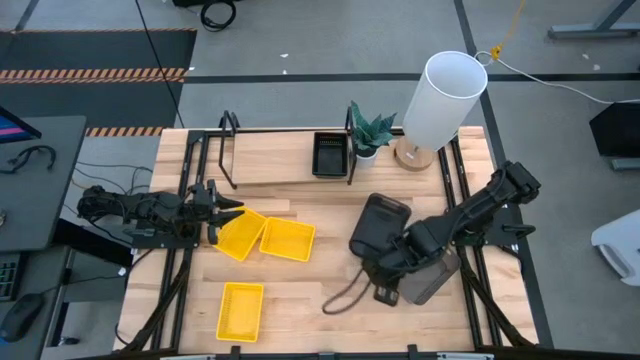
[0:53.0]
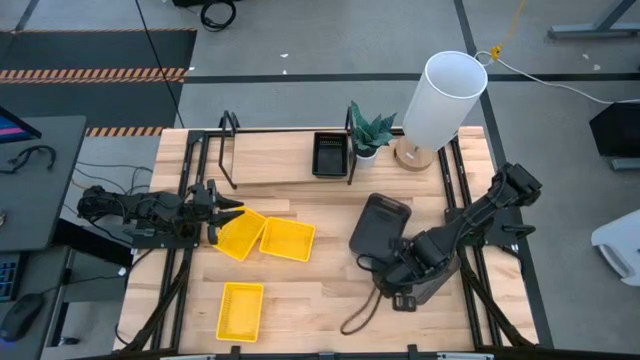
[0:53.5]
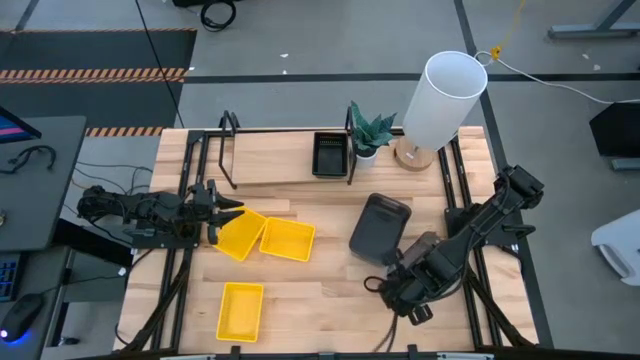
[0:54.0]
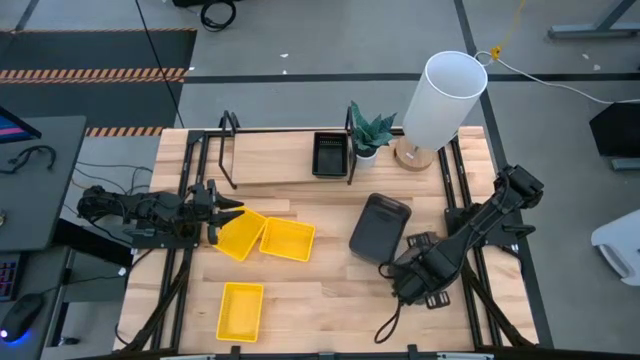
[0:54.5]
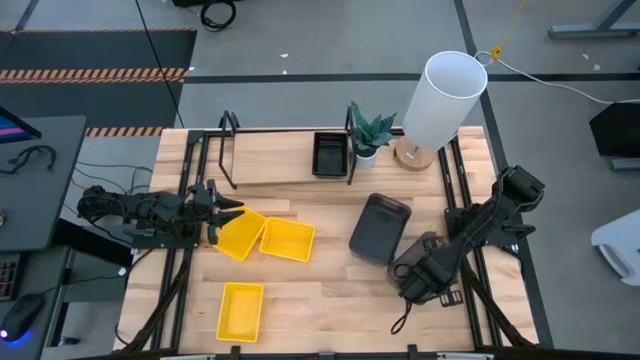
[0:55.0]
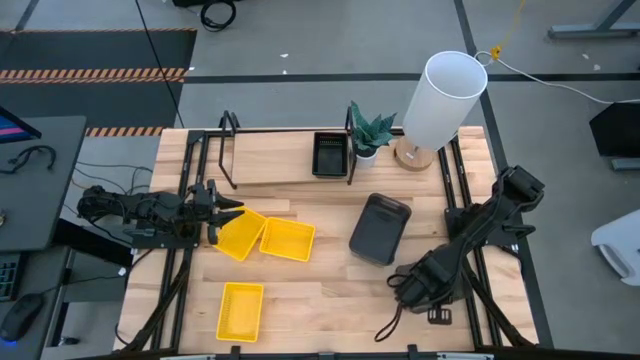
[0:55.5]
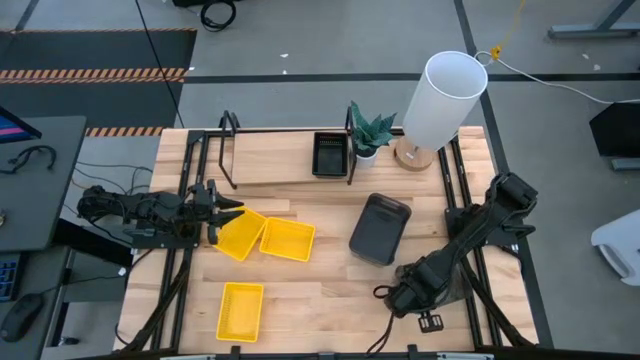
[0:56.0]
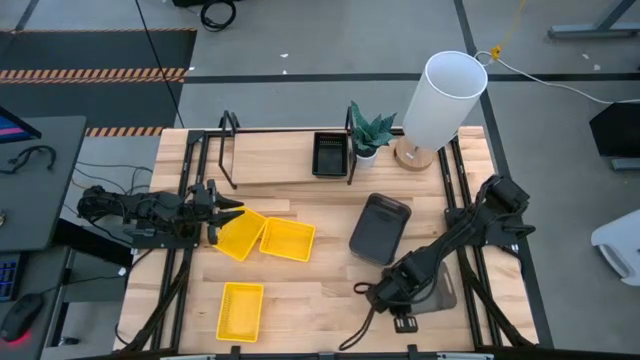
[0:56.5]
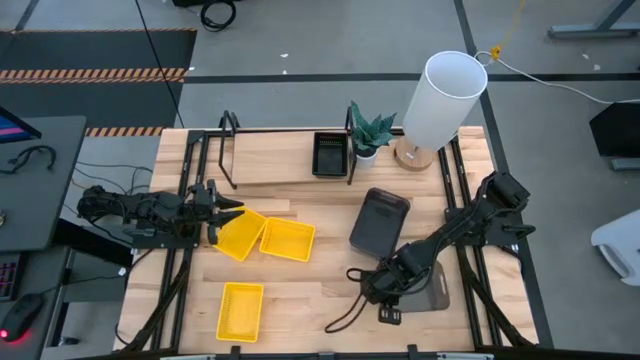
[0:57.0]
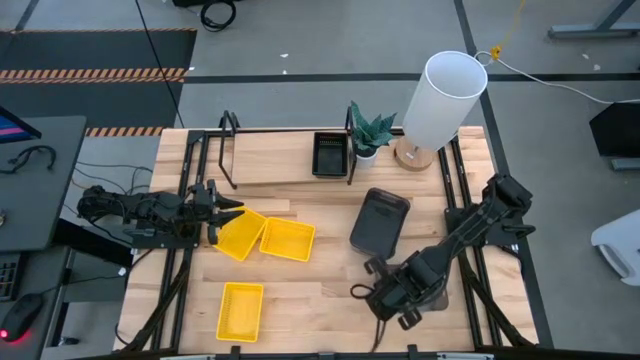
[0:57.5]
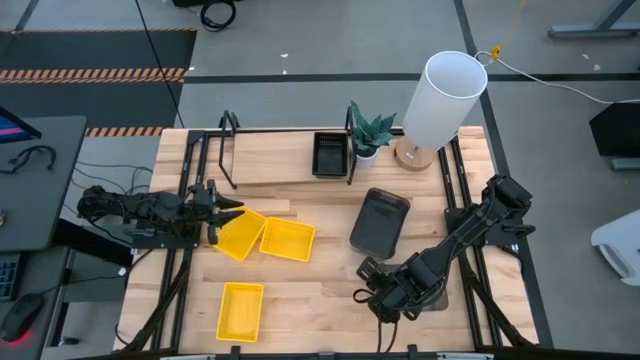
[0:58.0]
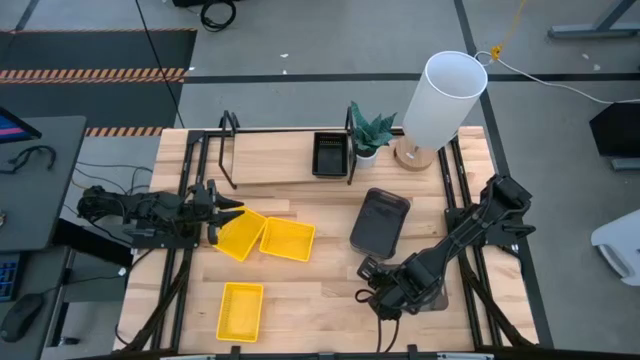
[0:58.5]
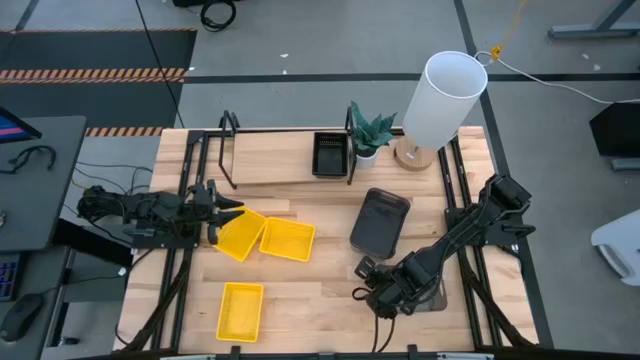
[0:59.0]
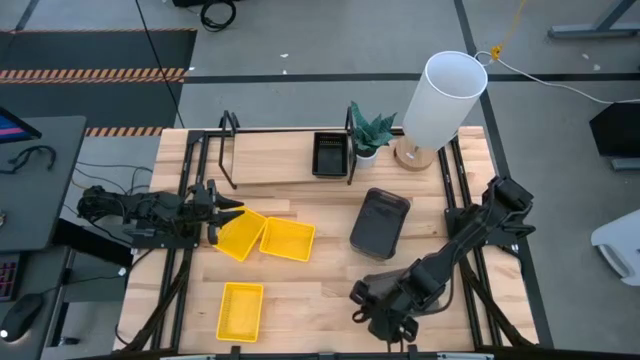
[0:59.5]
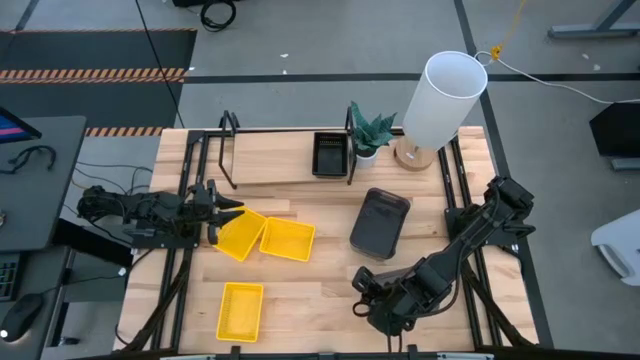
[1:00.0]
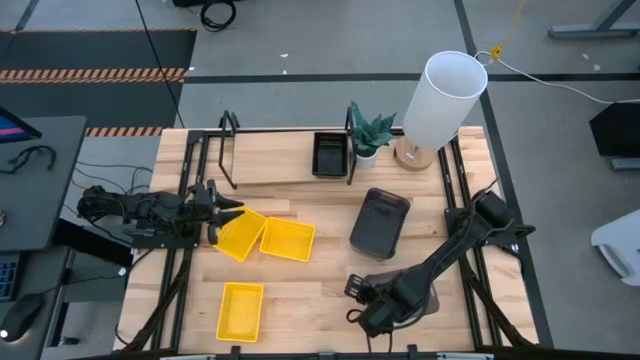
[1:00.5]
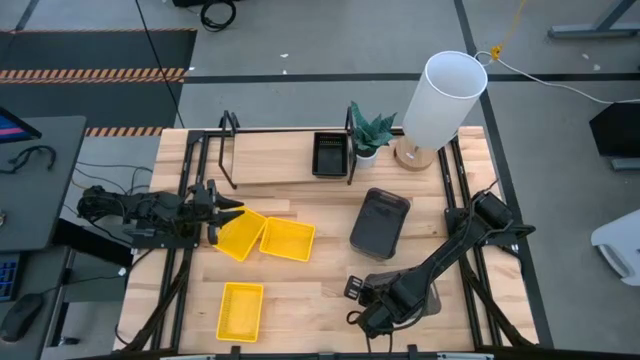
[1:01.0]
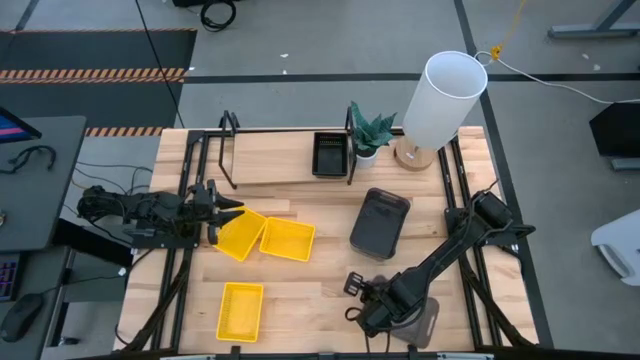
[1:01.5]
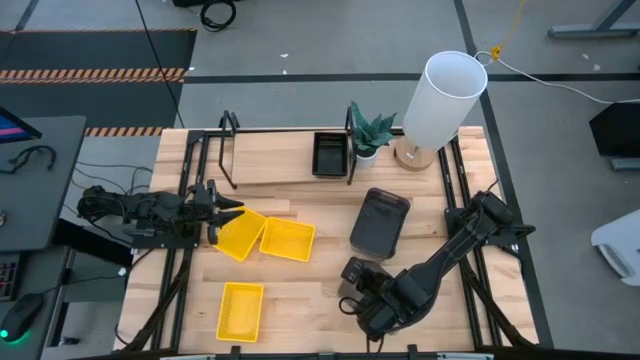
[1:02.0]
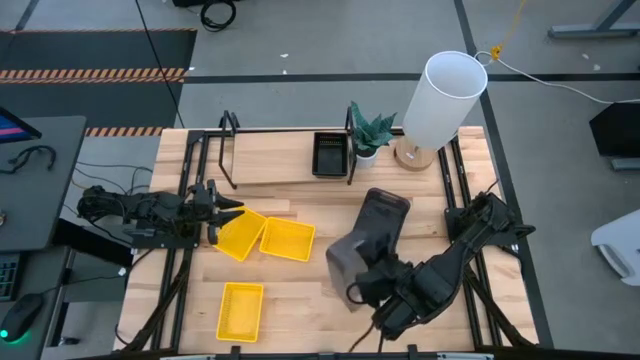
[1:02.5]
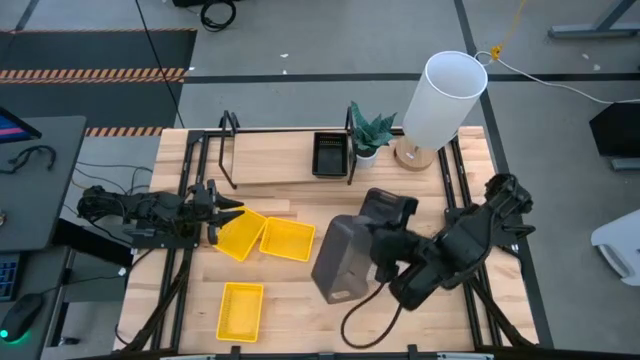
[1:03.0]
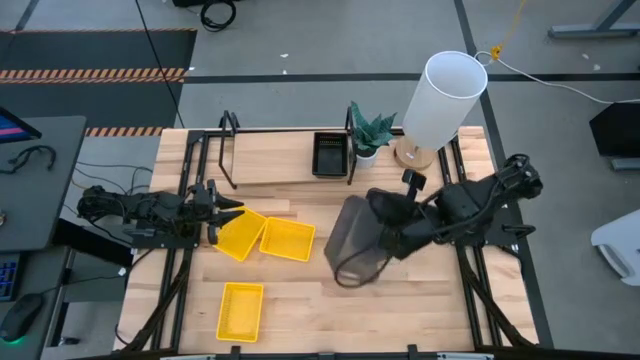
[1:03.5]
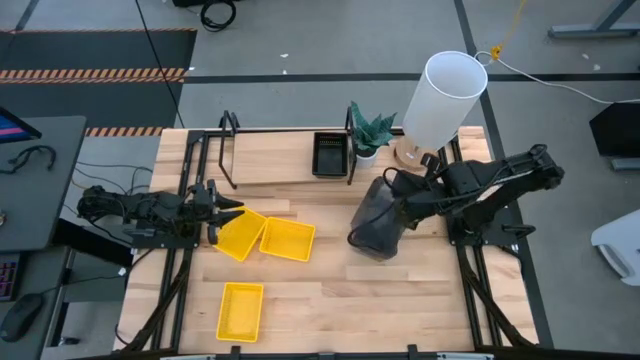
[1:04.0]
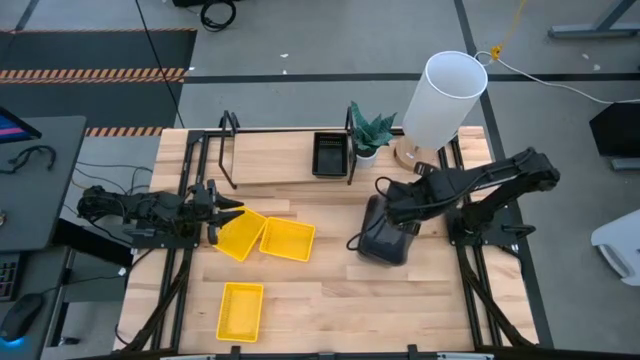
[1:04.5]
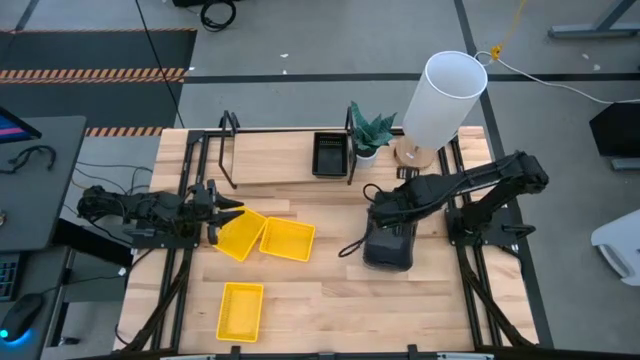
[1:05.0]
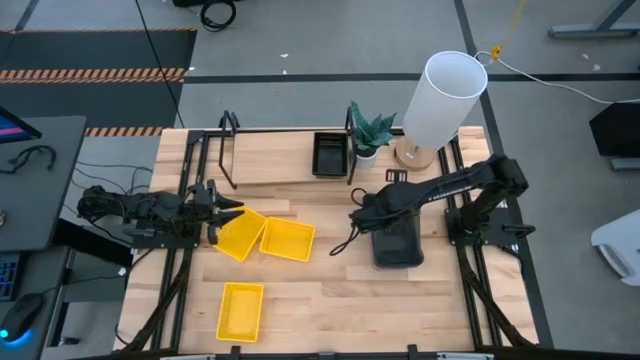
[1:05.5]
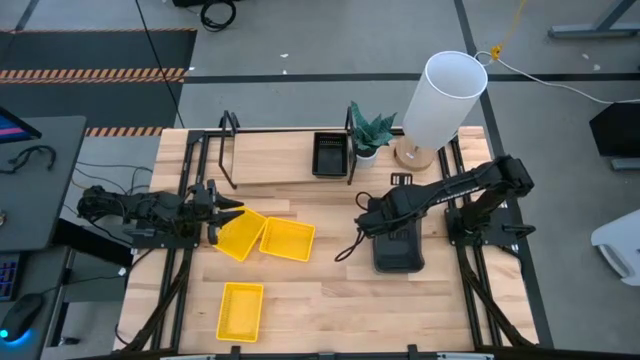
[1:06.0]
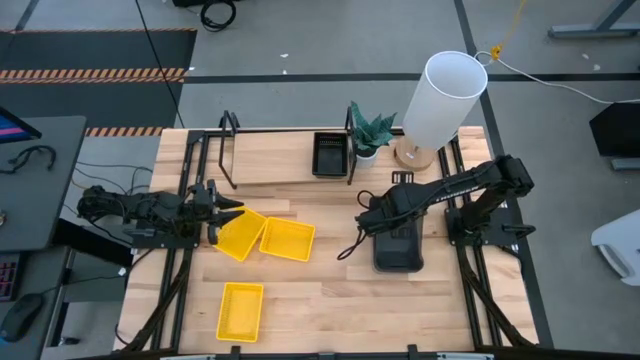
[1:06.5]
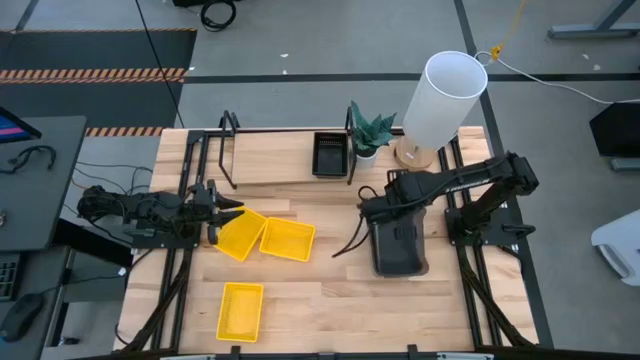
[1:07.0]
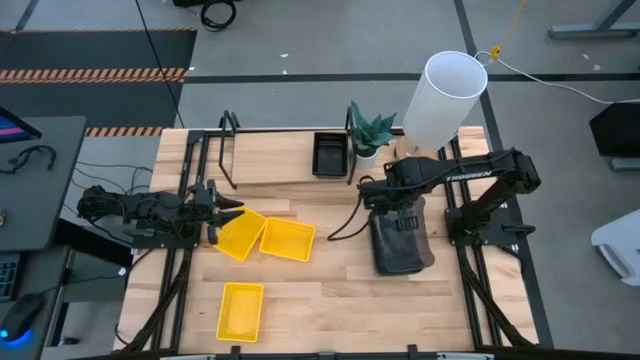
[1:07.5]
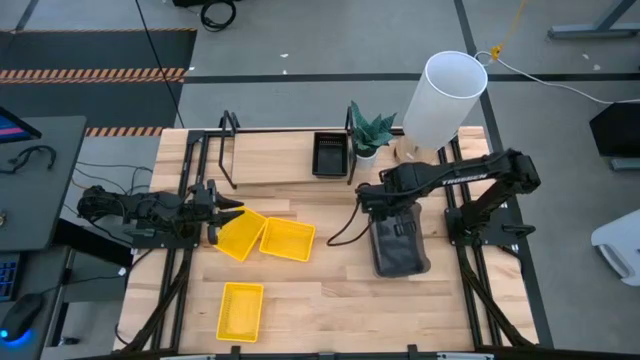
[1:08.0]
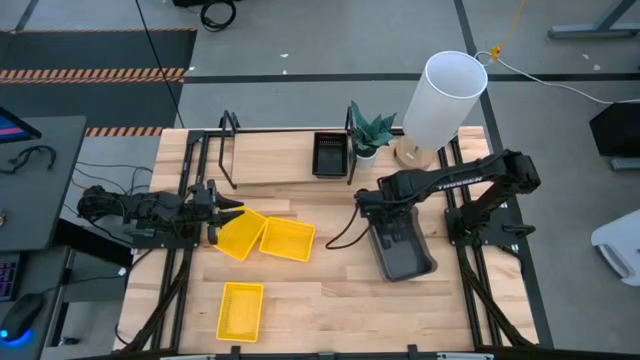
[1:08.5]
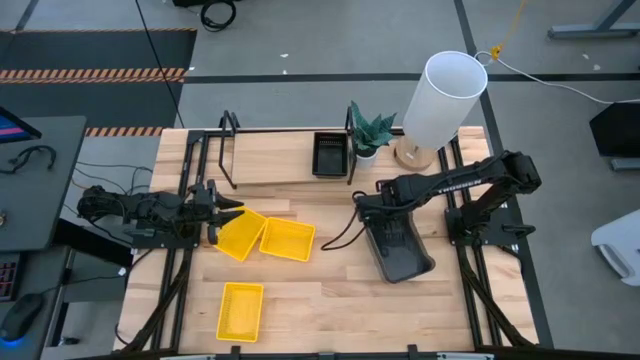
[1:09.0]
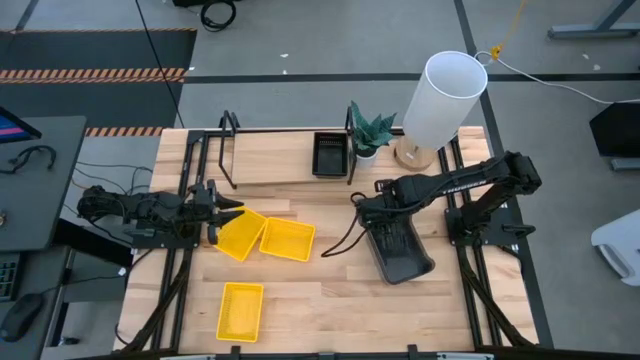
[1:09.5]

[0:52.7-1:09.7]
Task: Stack baskets on shelf by color
Stack the right transparent black bin on the left transparent black bin

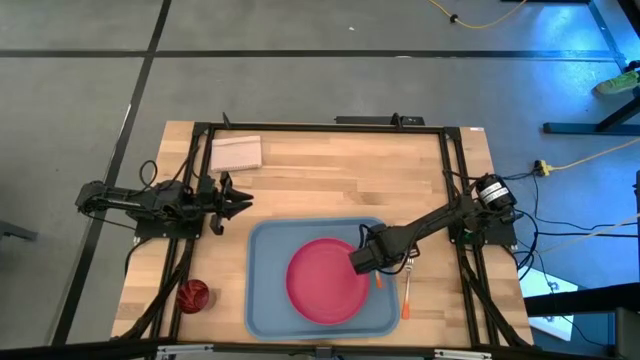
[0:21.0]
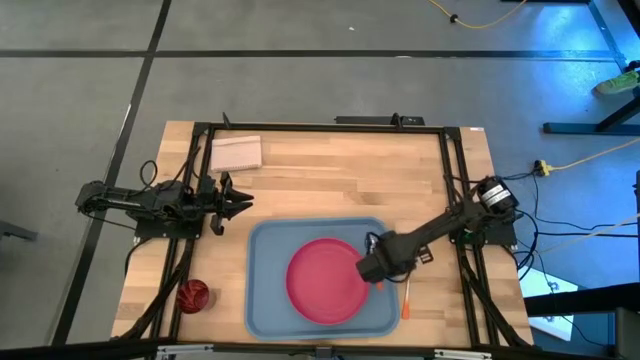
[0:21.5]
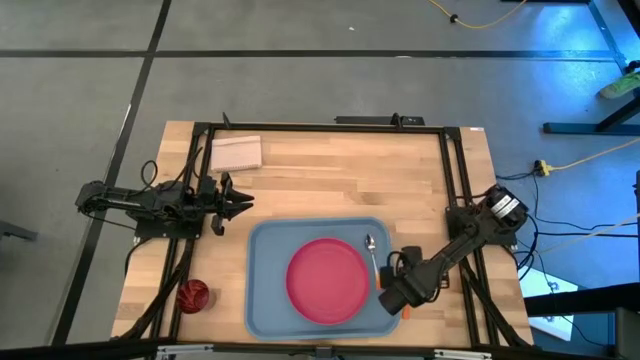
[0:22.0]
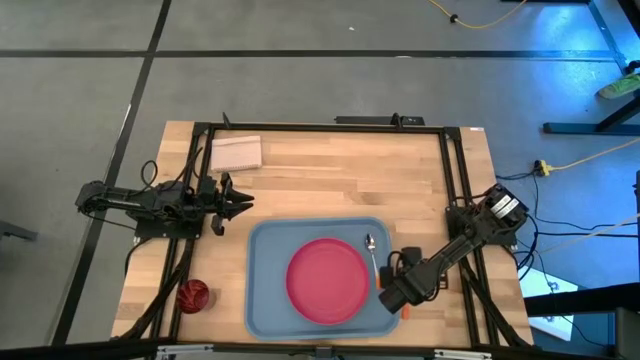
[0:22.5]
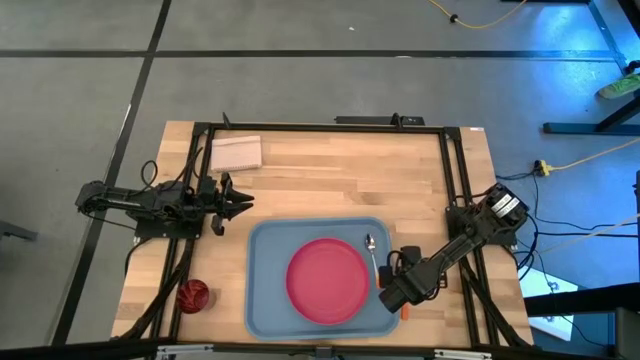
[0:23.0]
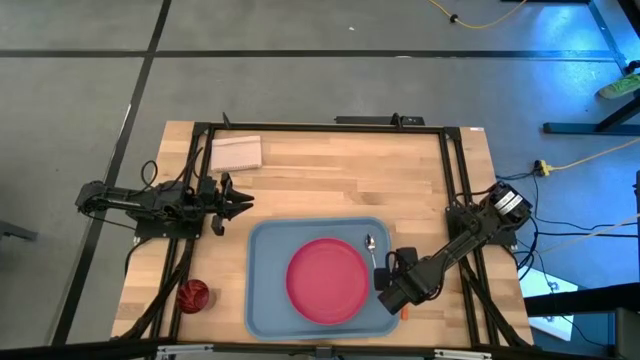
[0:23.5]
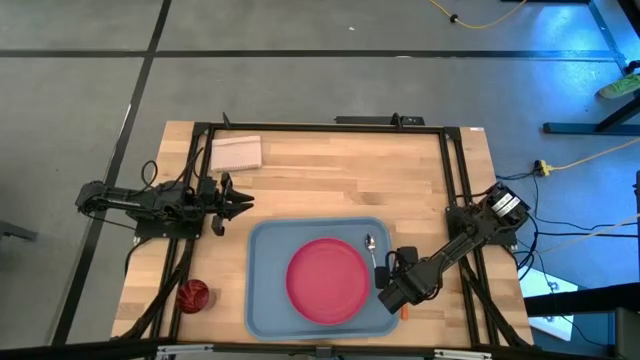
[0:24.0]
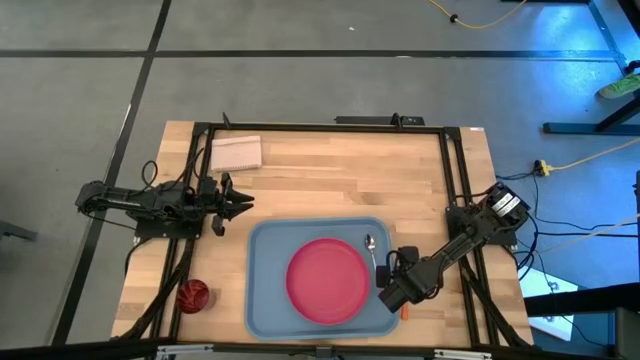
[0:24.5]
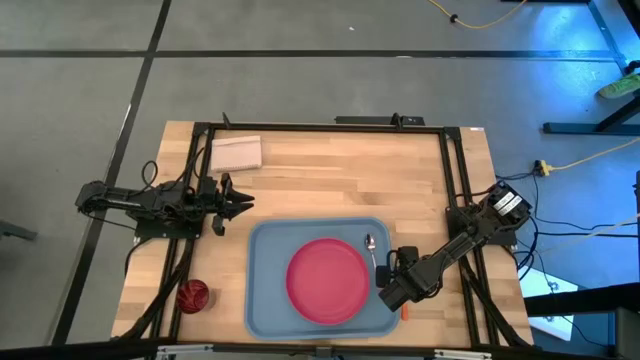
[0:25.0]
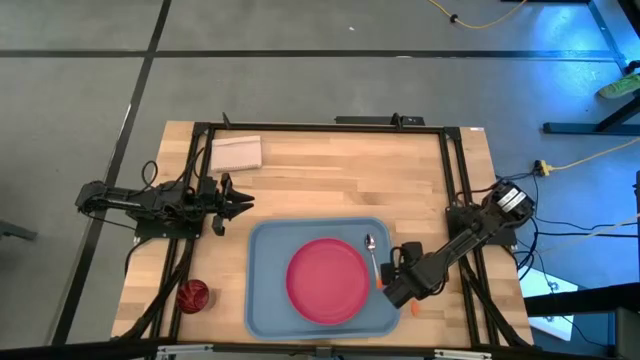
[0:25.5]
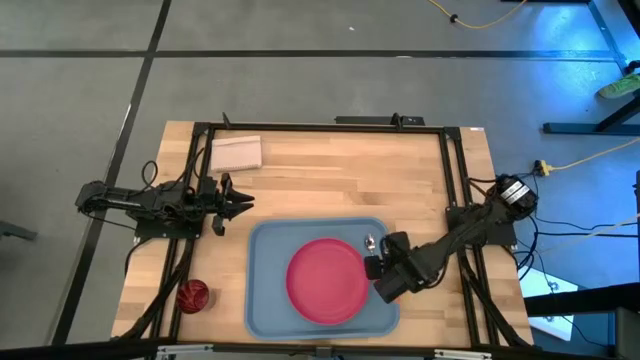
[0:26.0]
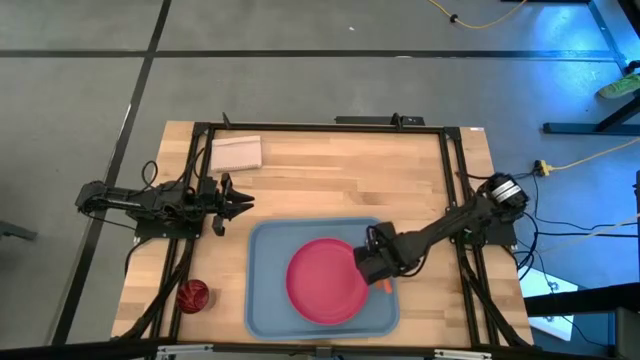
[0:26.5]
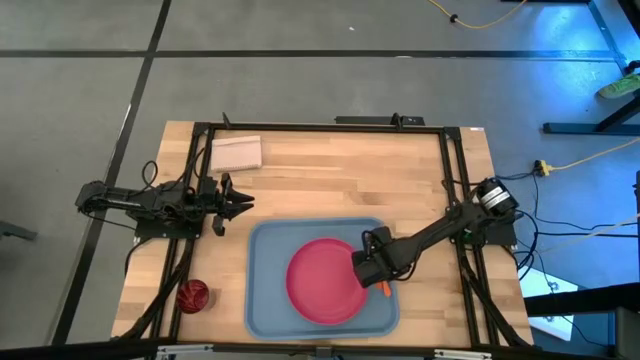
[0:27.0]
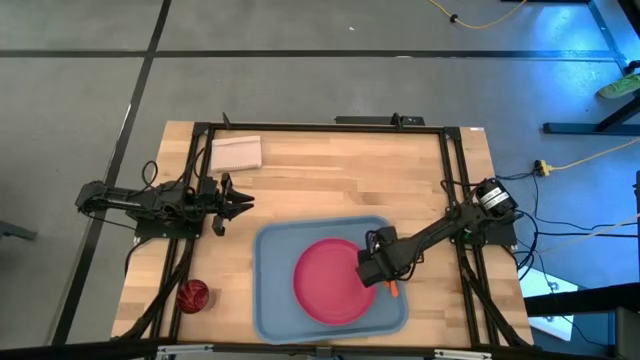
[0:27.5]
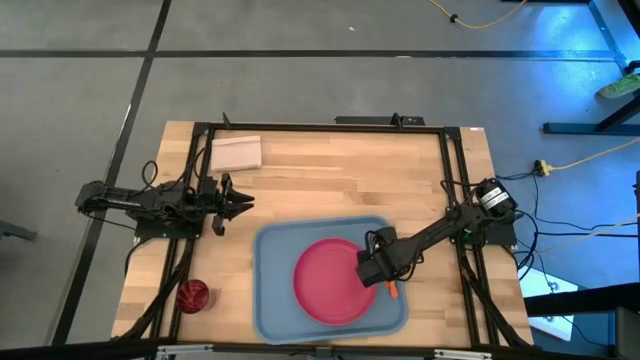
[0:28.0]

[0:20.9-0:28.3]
Task: Pick and place plate/cup/fork/spoon on tray
Put the orange fork on the blue tray to the right of the orange spoon
